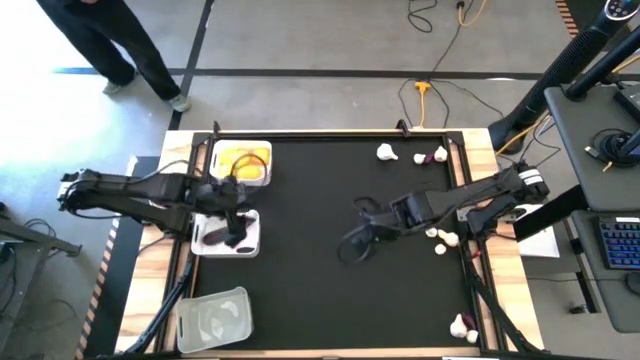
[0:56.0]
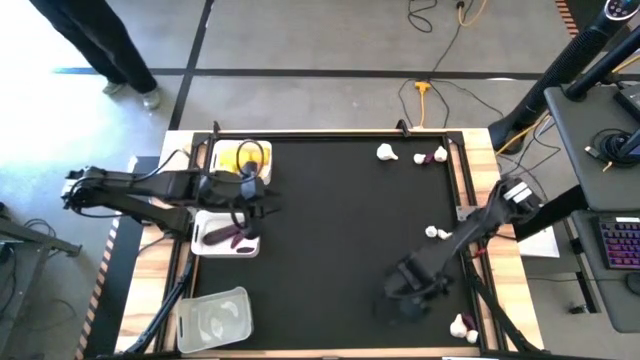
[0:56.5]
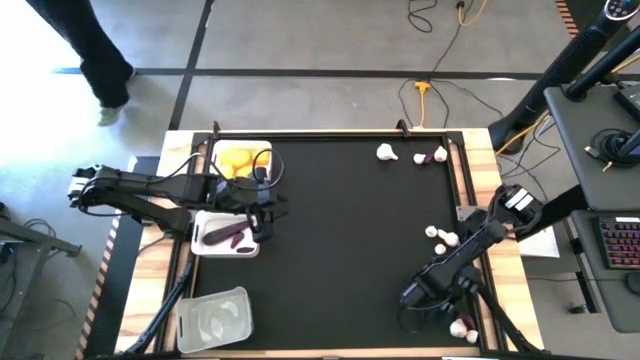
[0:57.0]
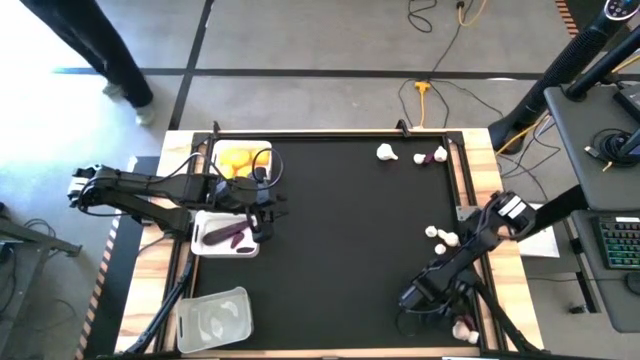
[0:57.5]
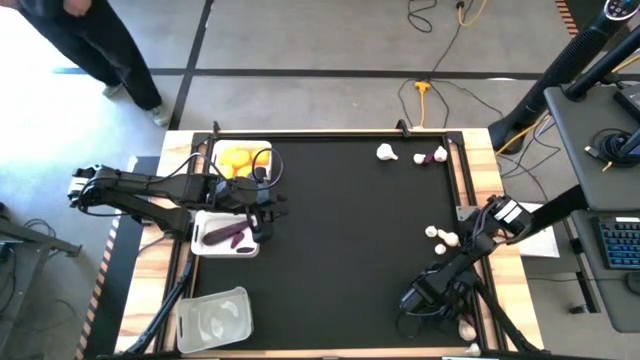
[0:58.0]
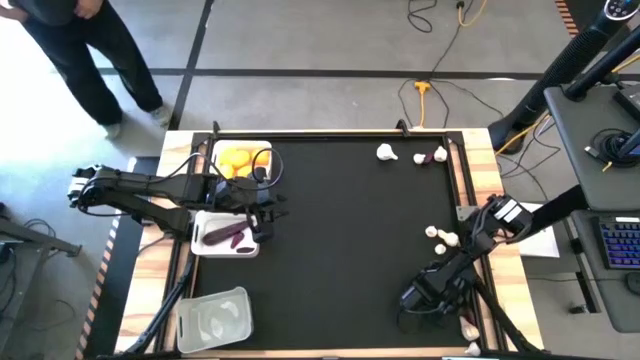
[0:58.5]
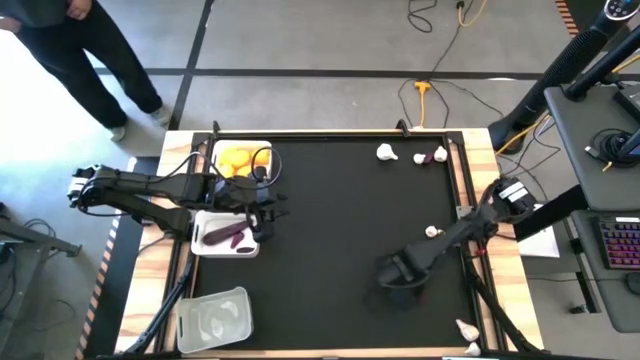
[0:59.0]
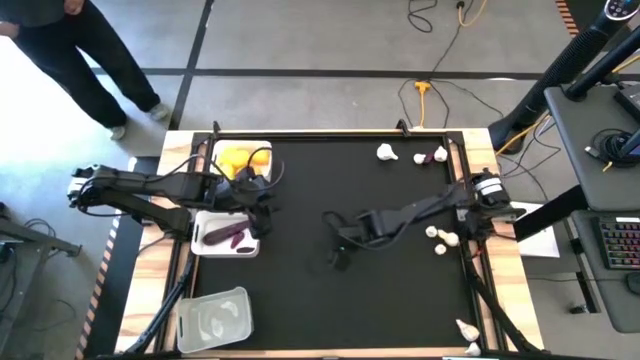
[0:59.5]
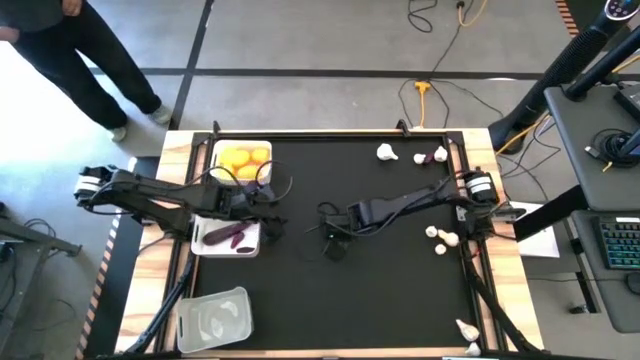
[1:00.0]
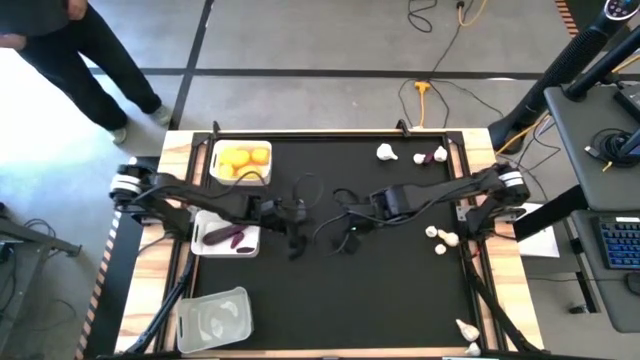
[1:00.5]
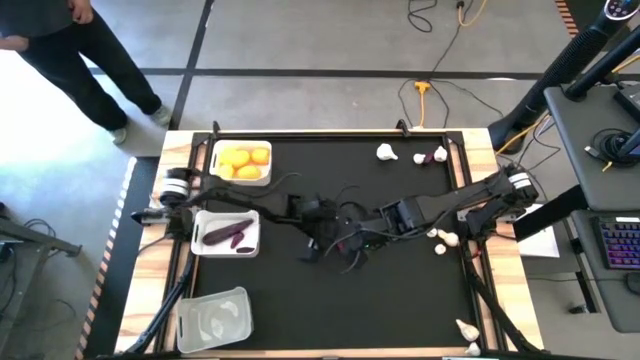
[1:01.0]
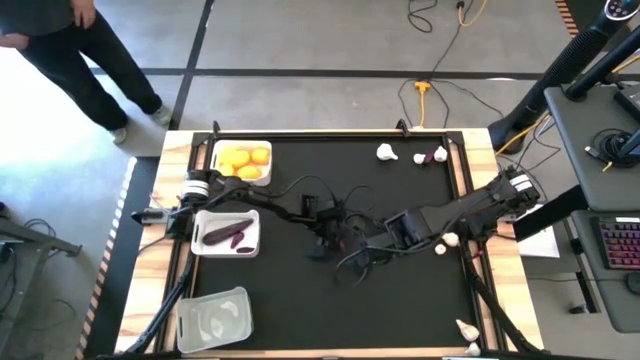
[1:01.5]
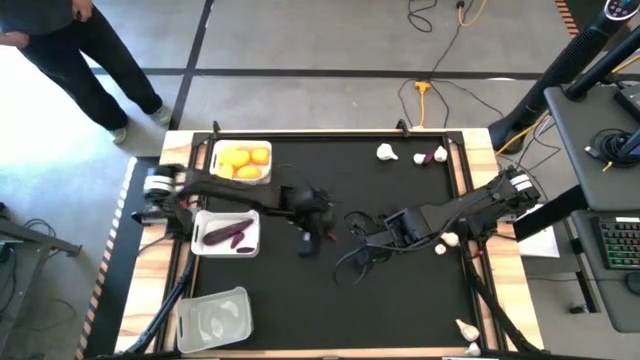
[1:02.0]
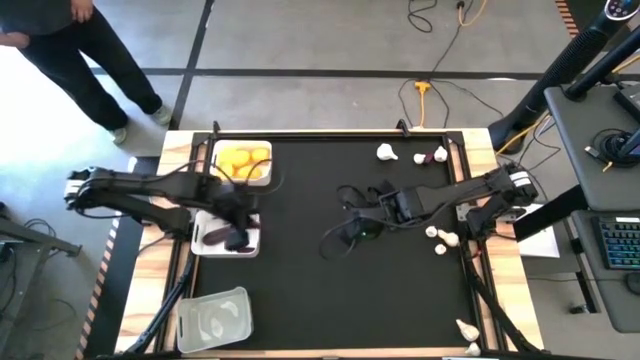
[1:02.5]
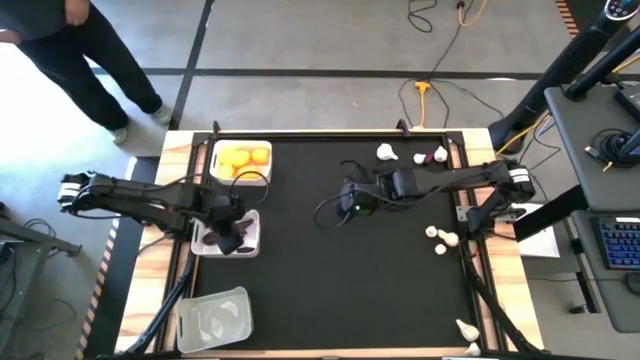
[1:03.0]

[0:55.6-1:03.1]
Task: Sort produce into baskets
Put the eggplant into the bottom white bin

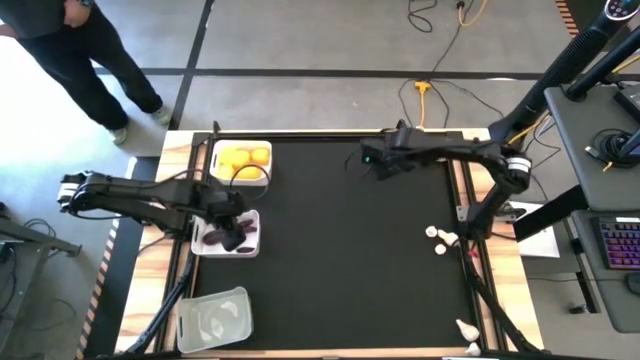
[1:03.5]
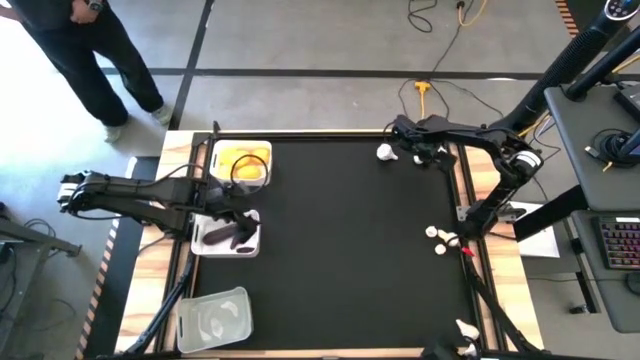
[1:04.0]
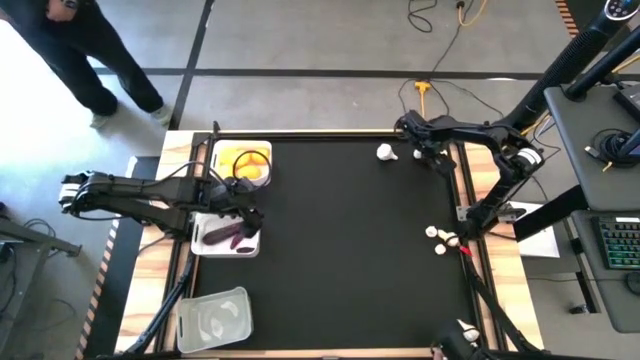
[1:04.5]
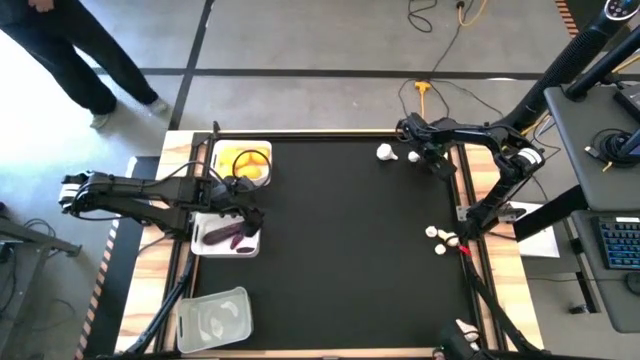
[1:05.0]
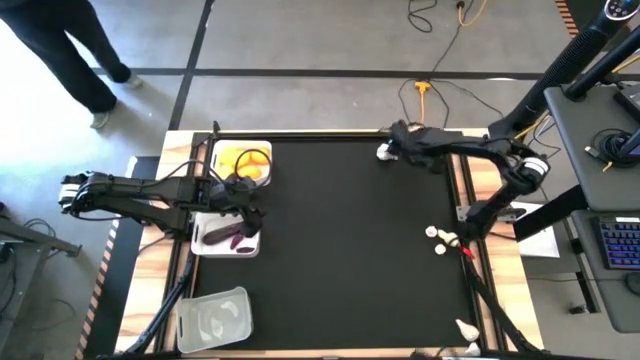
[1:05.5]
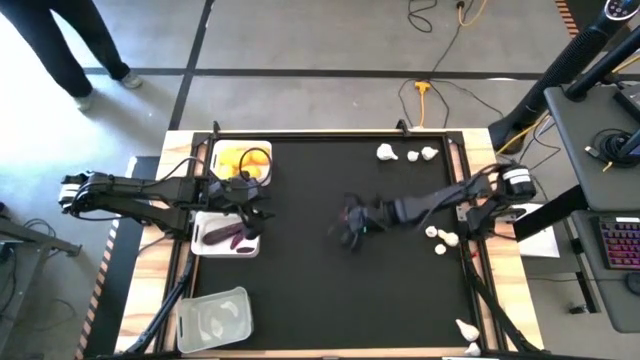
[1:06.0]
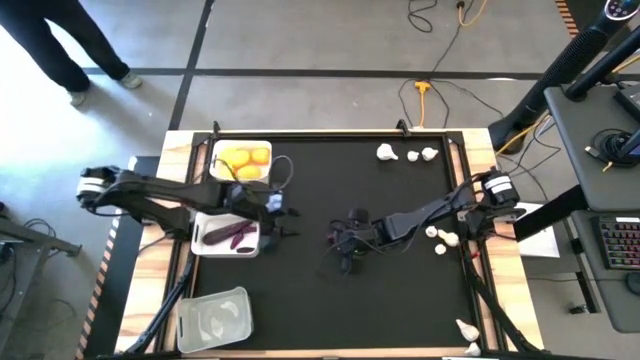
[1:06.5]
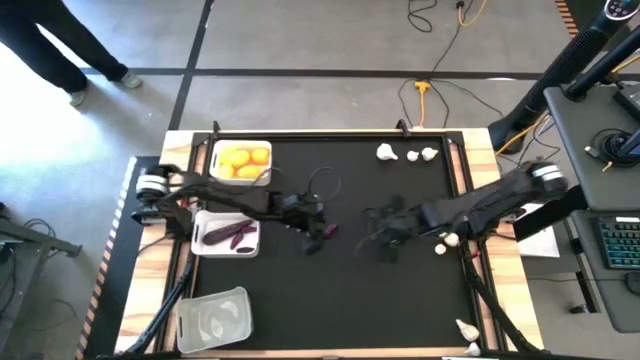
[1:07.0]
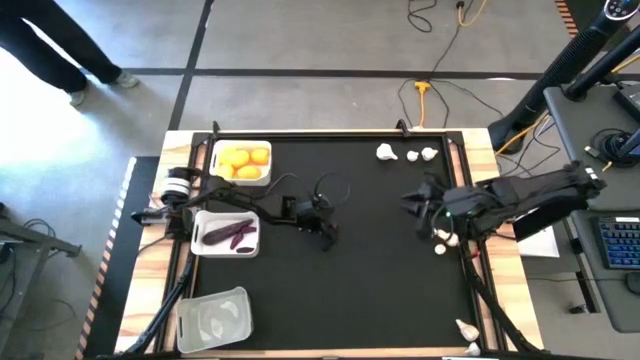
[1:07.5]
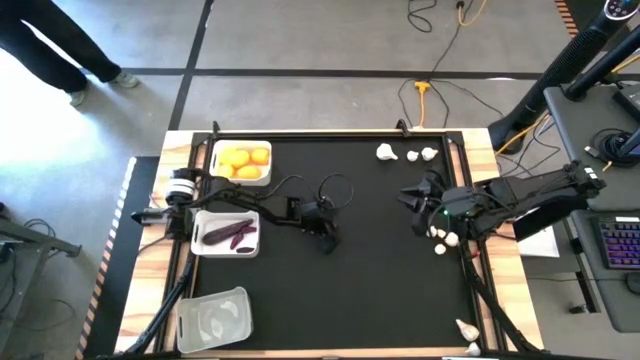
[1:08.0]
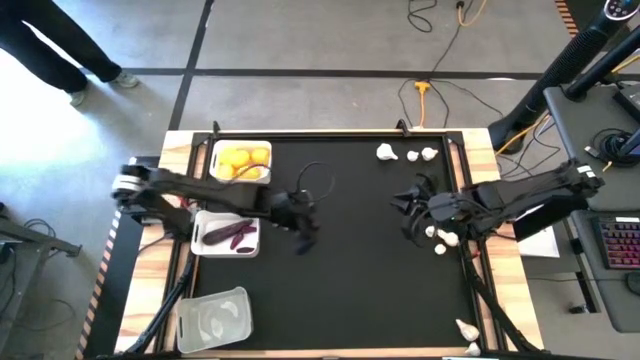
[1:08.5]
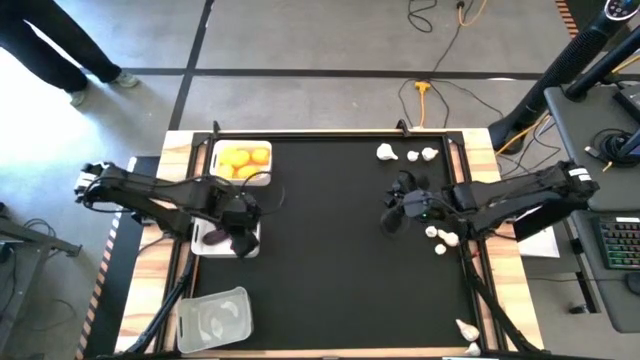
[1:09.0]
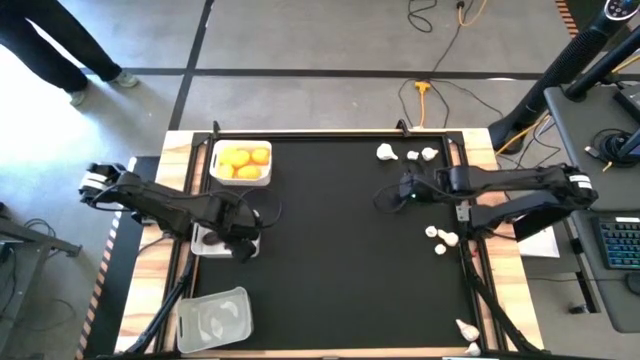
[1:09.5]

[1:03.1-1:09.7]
Put the eggplant into the bottom white bin

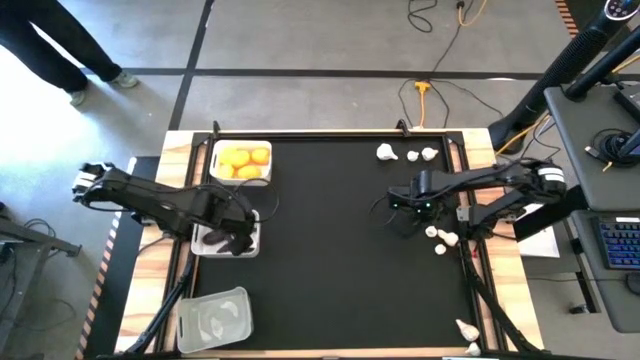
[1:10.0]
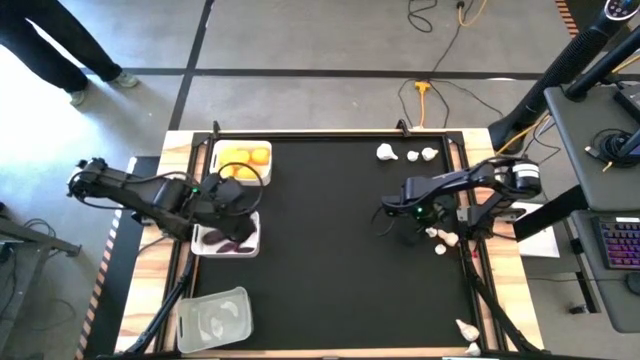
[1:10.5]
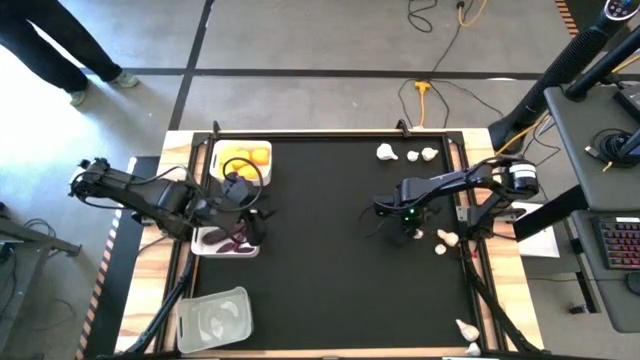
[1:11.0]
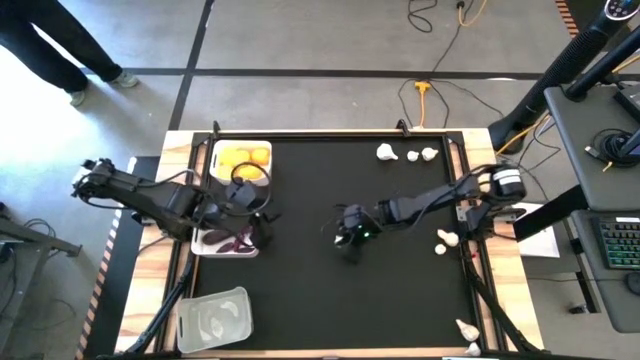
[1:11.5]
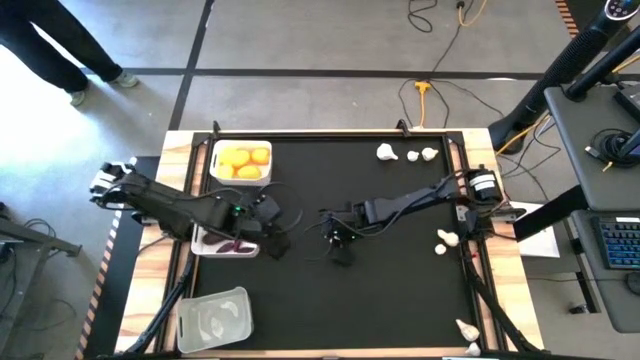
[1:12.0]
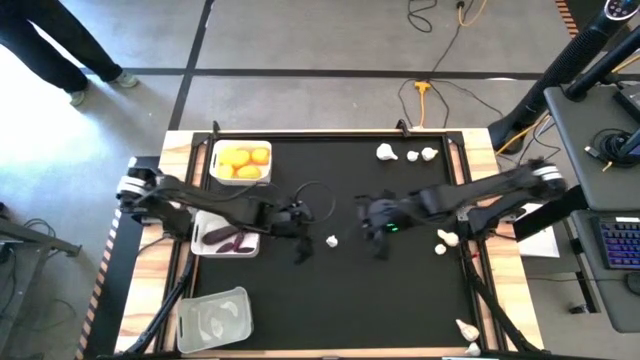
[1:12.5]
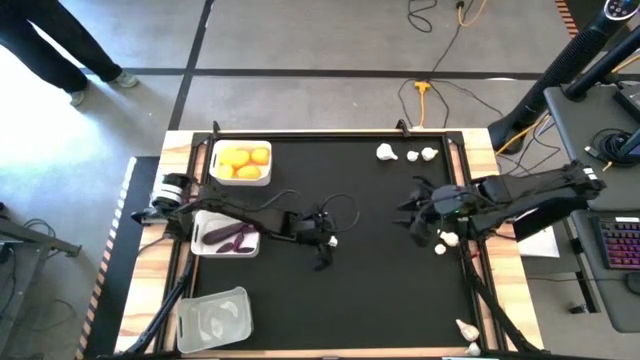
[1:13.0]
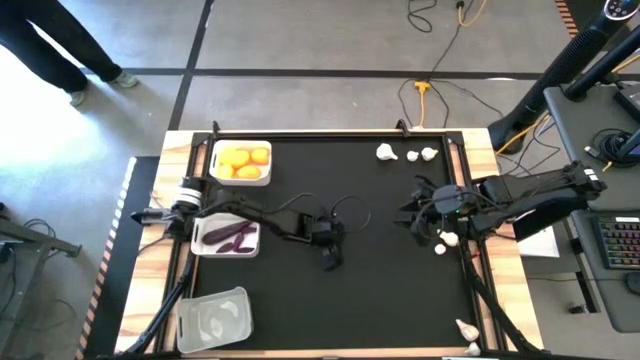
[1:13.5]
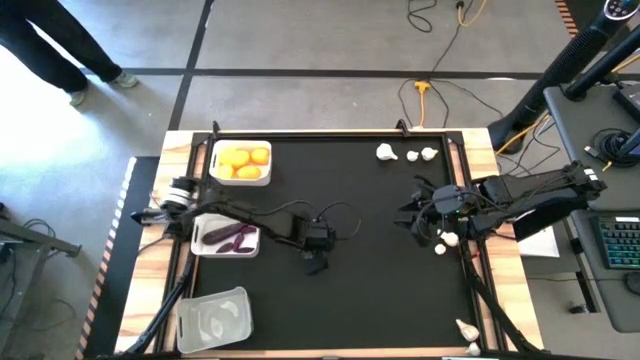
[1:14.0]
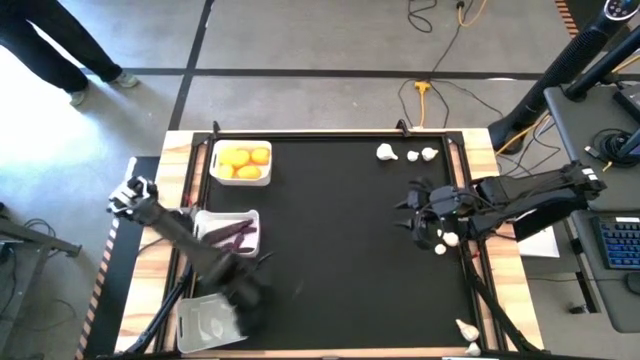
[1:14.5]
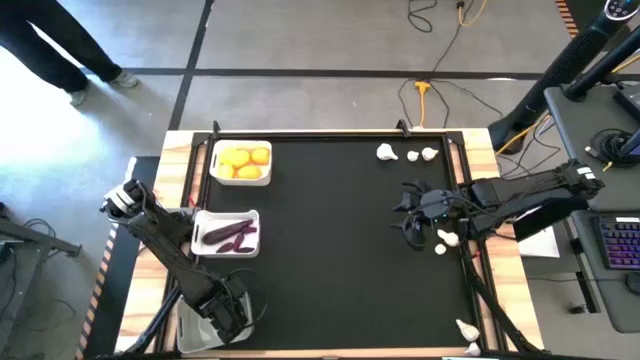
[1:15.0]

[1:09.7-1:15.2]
Put the garlic into the gray bin
